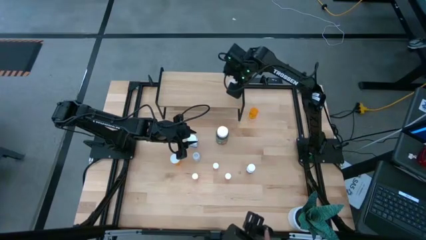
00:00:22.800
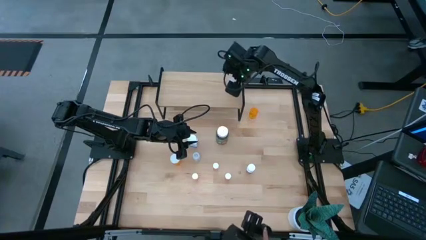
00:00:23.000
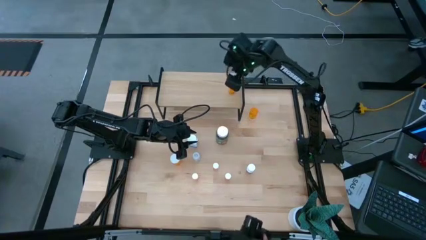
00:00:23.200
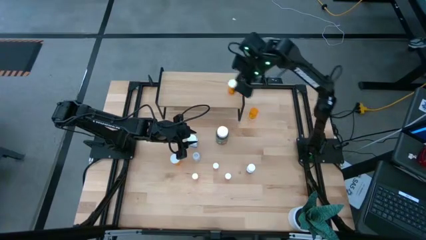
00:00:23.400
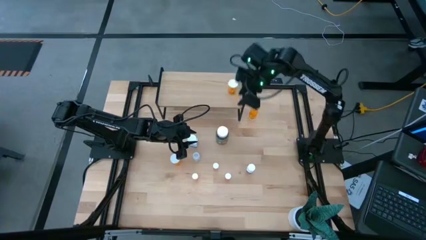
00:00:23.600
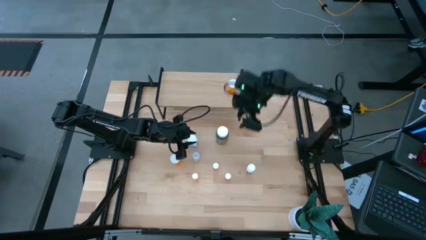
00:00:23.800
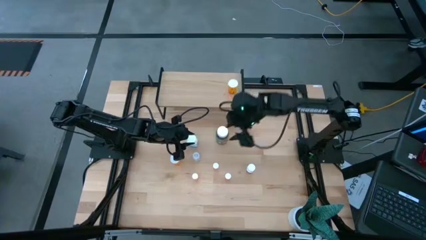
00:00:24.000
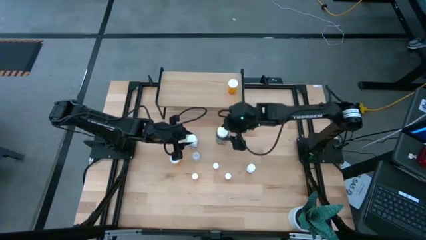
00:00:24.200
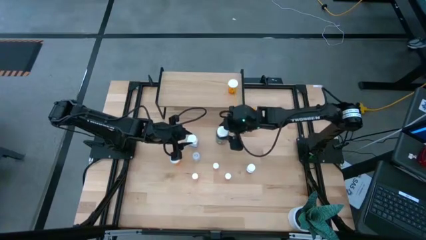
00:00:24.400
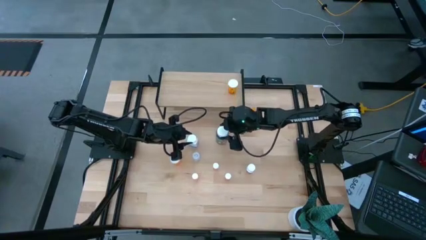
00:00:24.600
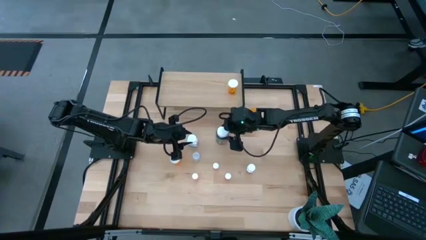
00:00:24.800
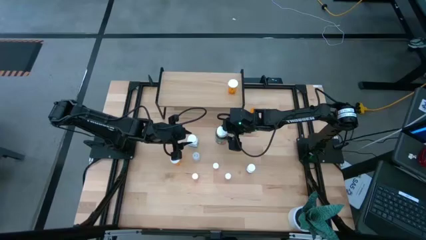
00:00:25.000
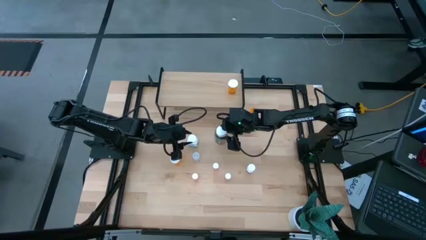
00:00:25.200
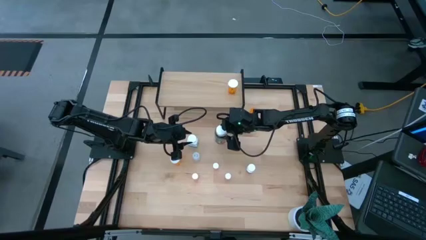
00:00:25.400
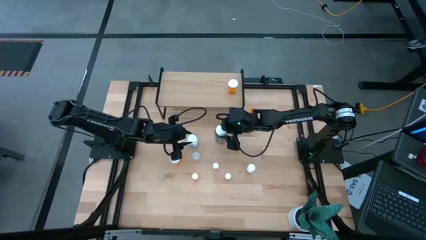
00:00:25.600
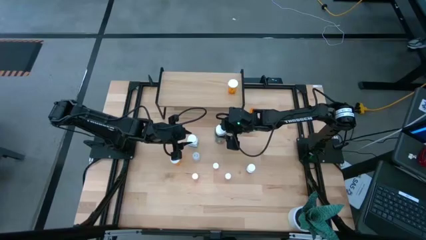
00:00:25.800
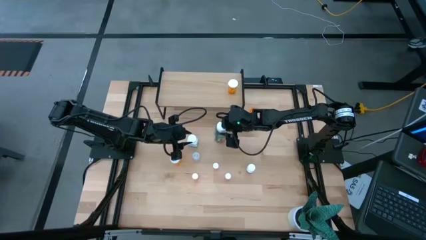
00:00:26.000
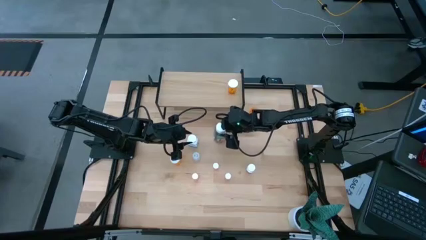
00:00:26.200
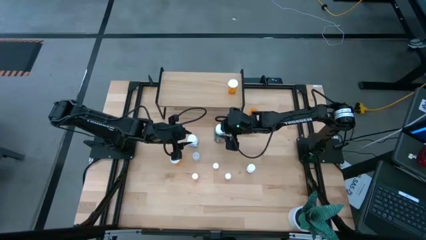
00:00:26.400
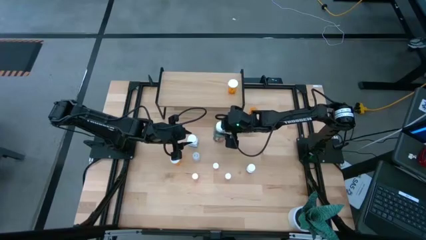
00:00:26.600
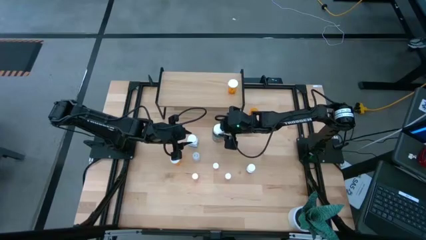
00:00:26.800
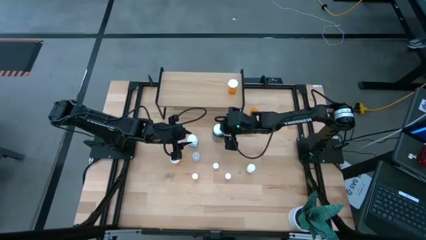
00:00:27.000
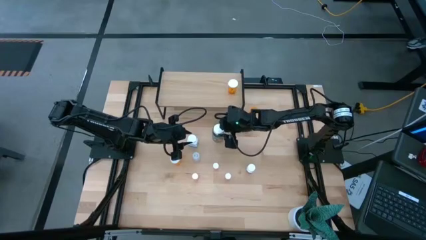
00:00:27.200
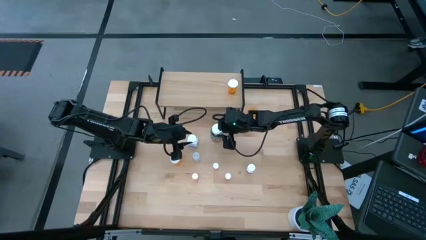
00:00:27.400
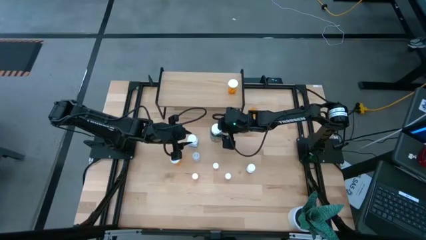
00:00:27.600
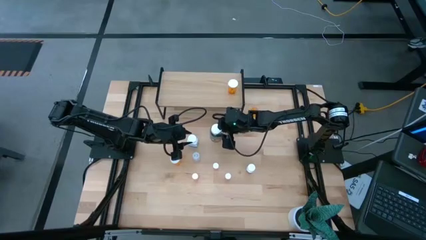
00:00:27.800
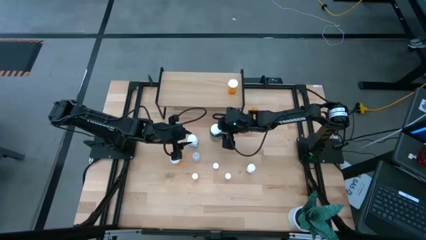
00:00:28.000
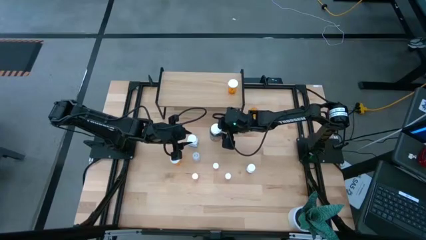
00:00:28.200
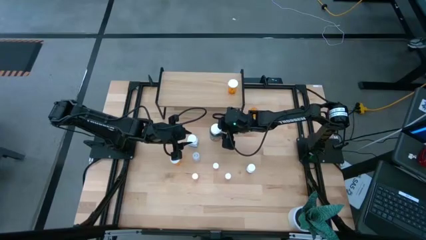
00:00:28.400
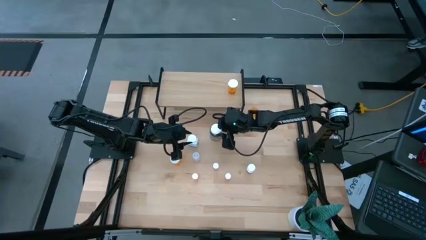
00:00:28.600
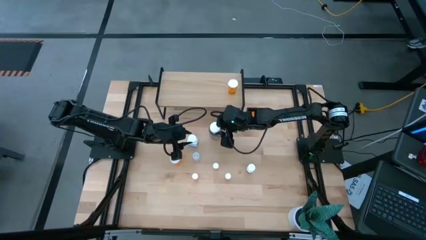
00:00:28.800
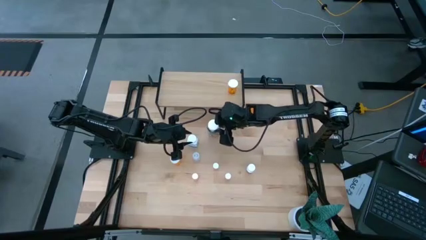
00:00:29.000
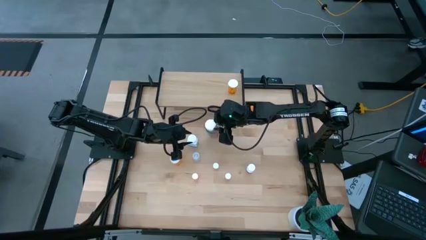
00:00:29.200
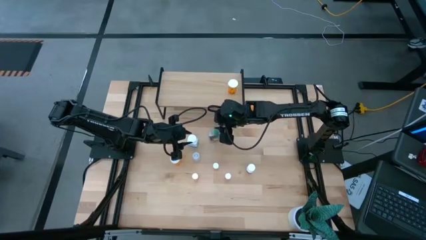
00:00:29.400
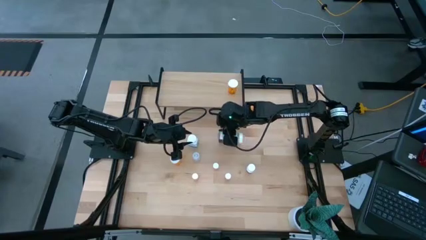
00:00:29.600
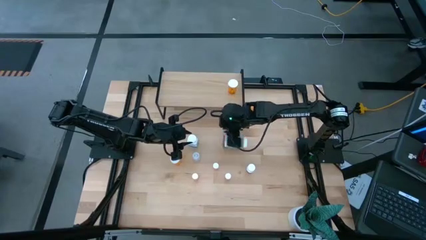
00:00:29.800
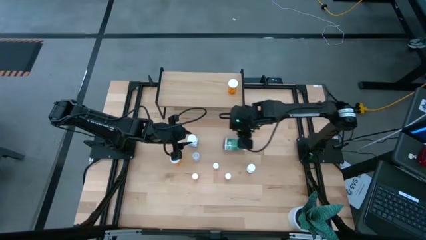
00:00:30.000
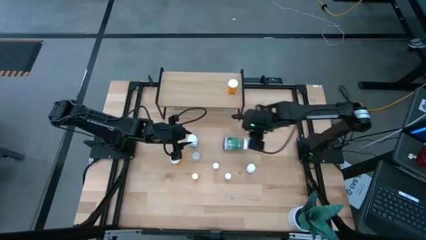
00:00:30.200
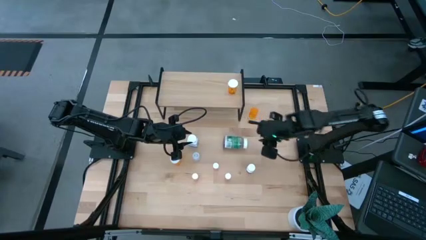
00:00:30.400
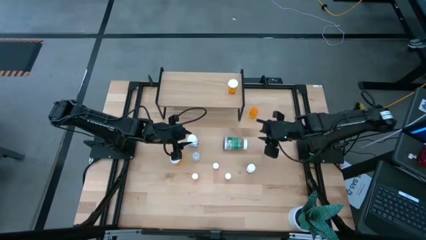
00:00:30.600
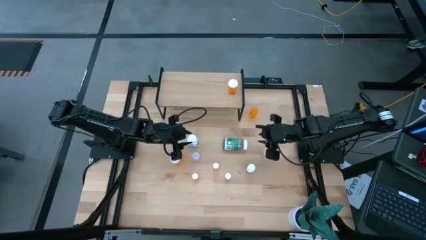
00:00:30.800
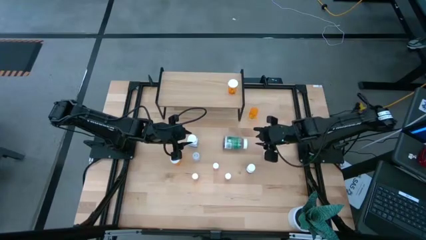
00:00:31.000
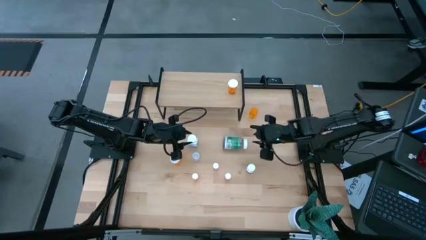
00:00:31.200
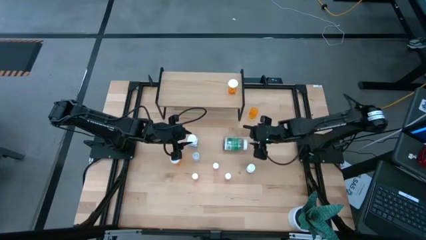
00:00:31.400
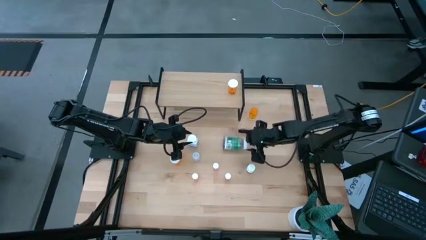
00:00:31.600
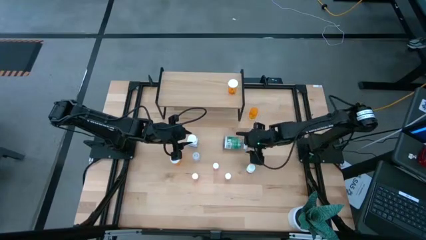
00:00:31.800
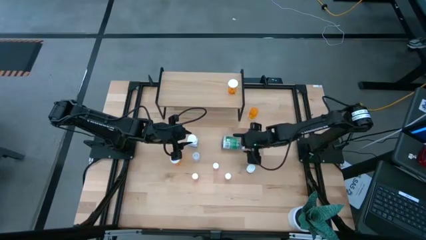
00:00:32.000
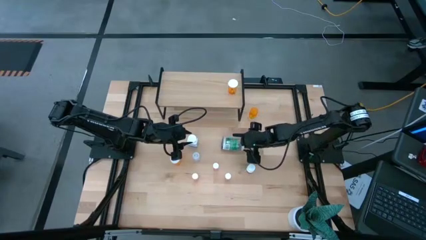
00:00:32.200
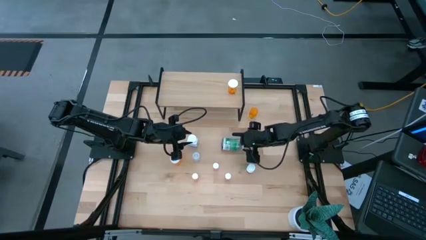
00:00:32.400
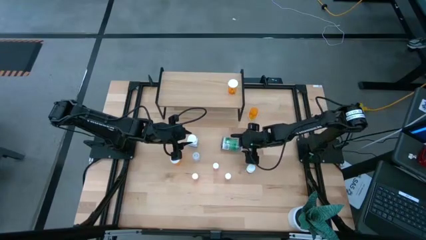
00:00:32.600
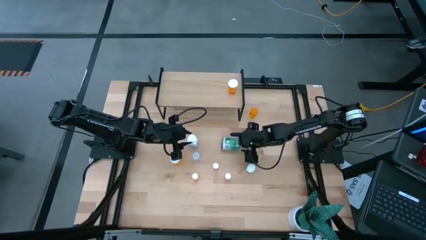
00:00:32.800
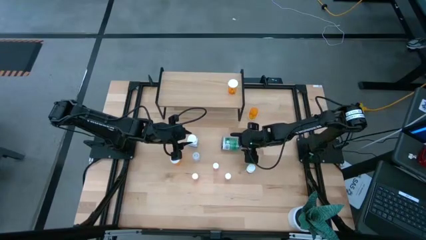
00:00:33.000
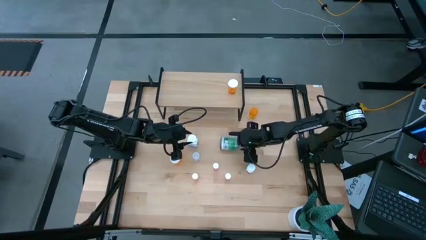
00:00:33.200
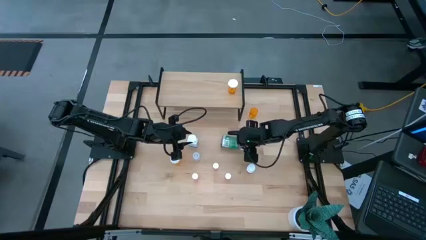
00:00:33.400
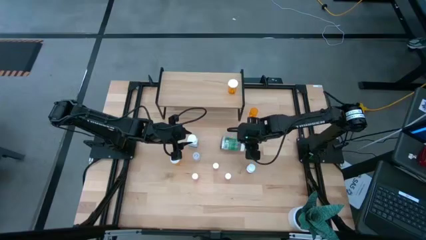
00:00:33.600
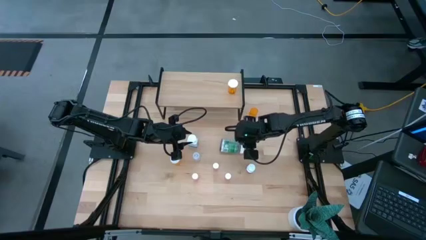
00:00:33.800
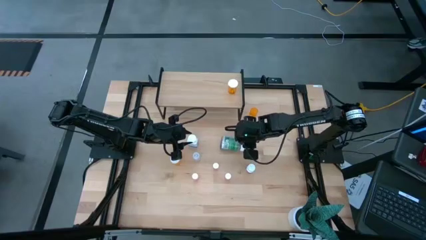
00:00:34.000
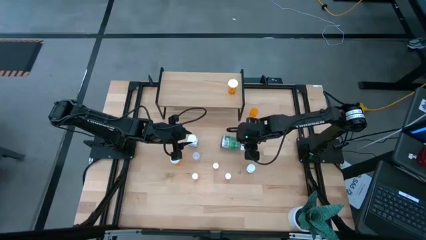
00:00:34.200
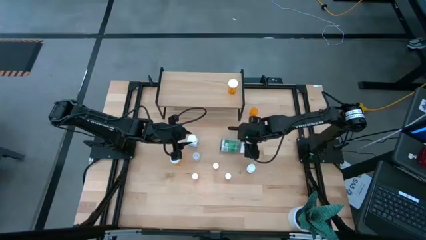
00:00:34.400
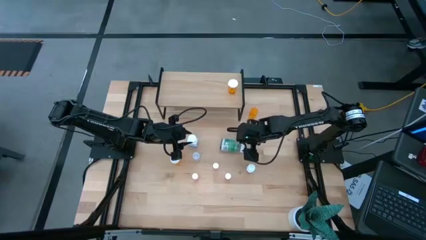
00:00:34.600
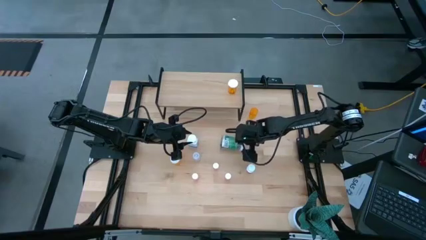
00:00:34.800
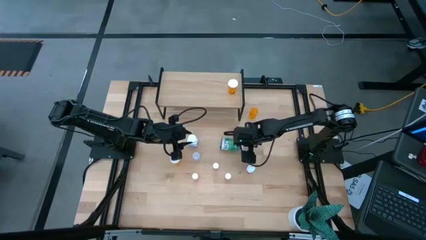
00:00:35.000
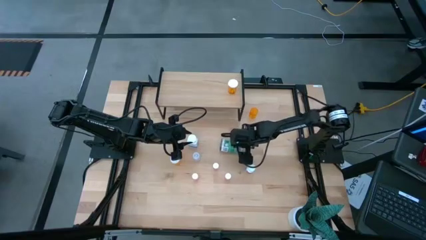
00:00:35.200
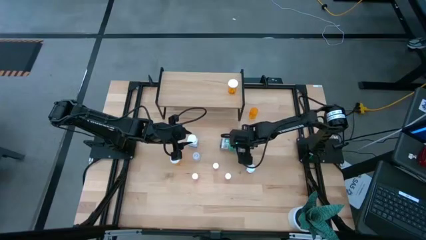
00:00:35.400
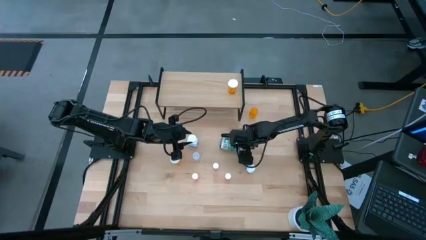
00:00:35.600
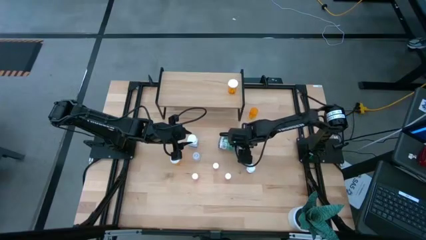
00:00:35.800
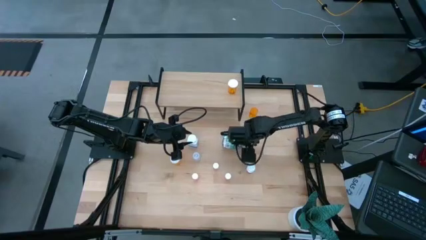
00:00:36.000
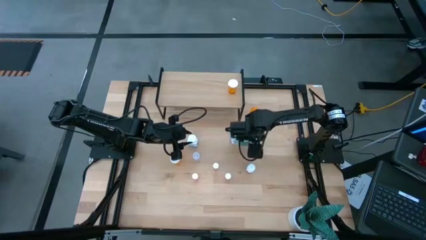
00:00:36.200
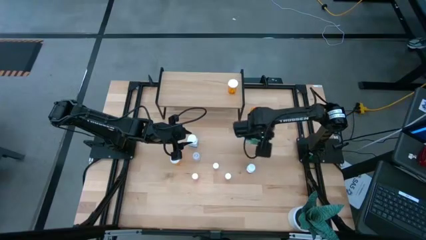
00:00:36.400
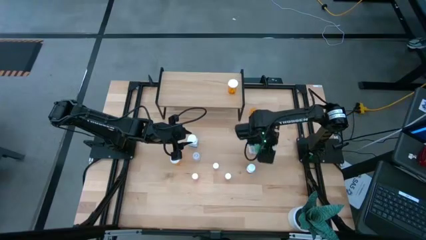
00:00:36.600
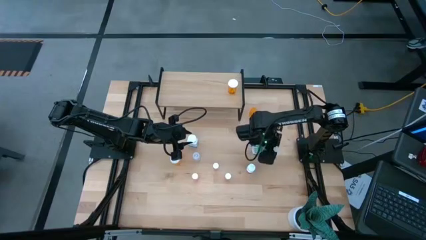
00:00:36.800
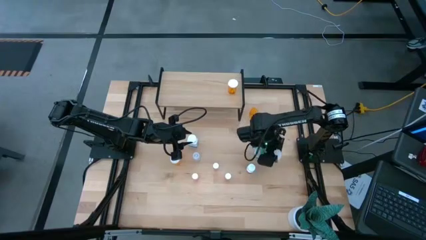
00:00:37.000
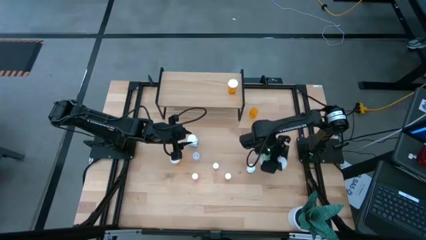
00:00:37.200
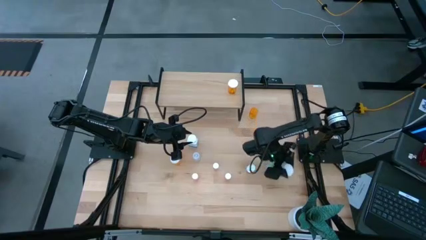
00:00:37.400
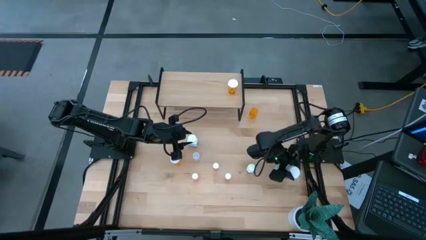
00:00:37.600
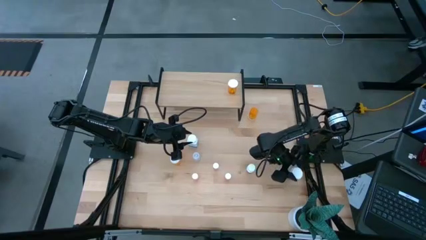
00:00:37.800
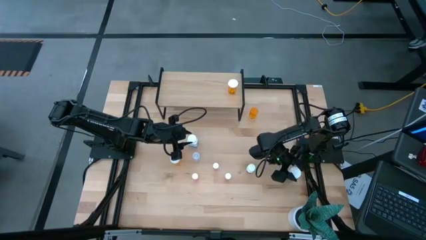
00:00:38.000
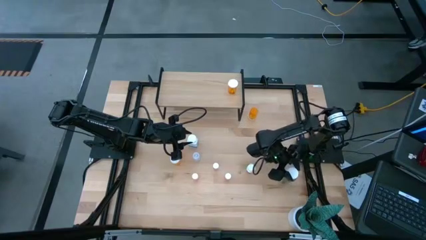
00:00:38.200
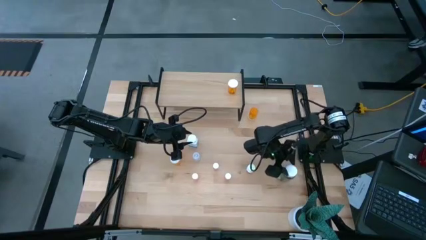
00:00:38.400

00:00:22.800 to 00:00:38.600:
Task: Pick and place medicine bottles onto shelf by color
Put the green pill bottle on the shelf
